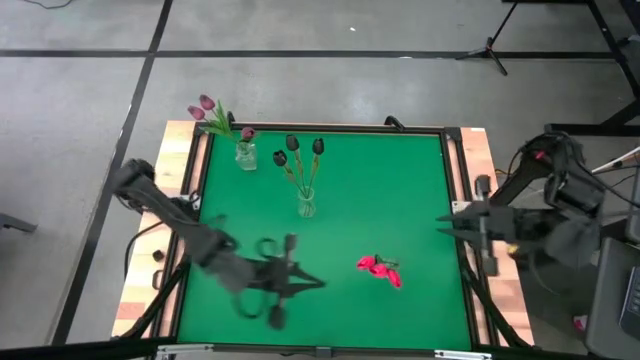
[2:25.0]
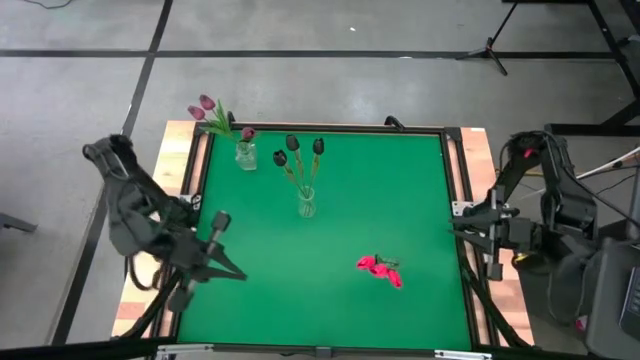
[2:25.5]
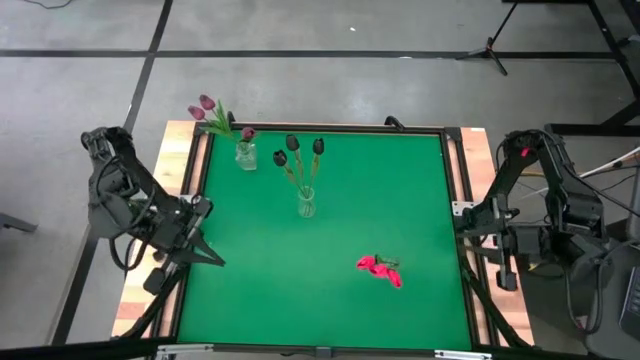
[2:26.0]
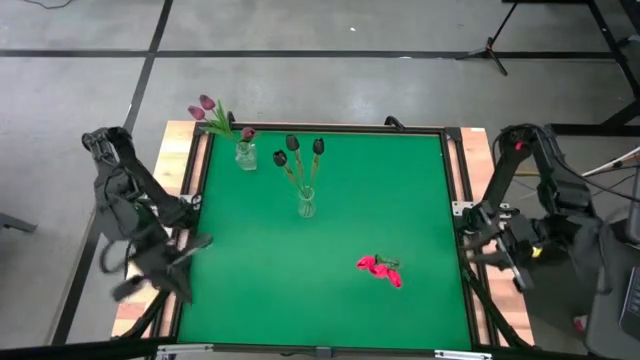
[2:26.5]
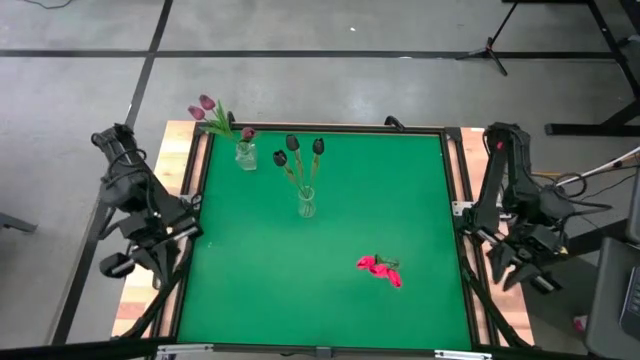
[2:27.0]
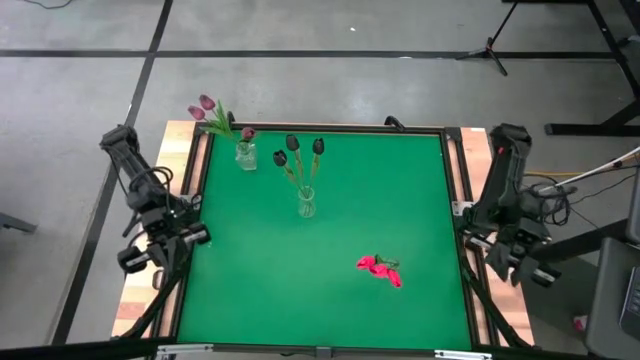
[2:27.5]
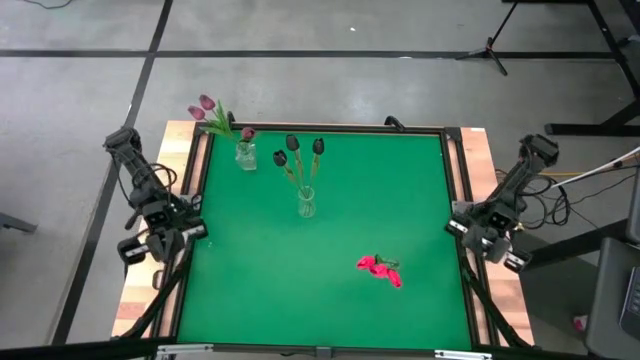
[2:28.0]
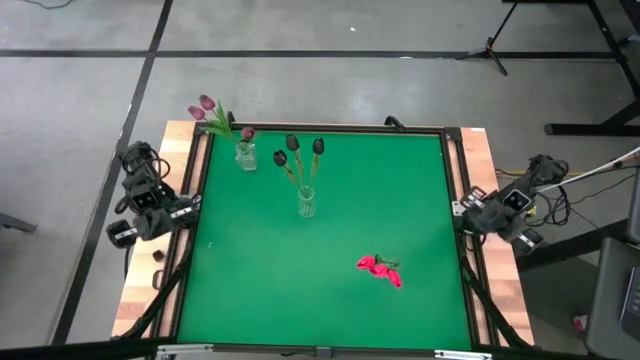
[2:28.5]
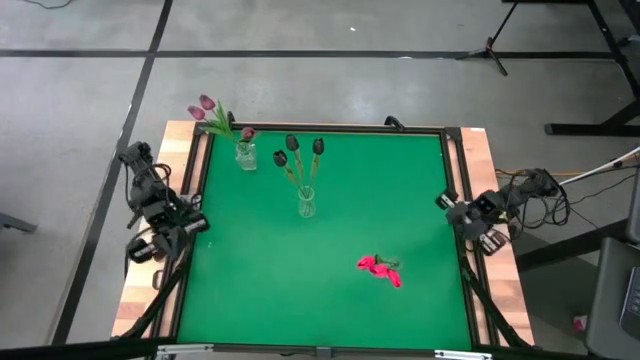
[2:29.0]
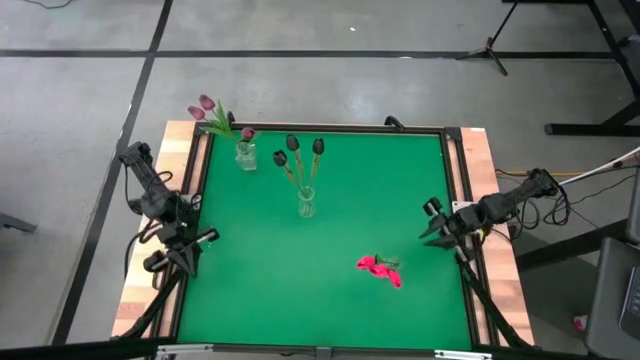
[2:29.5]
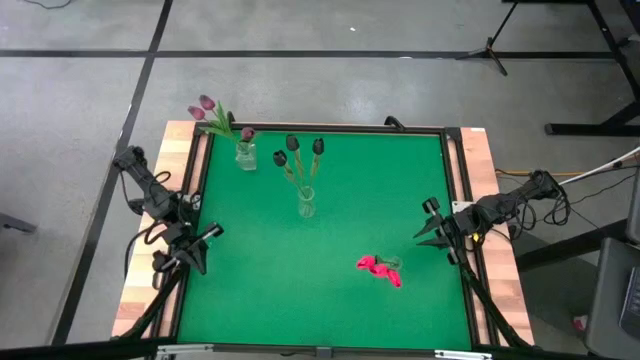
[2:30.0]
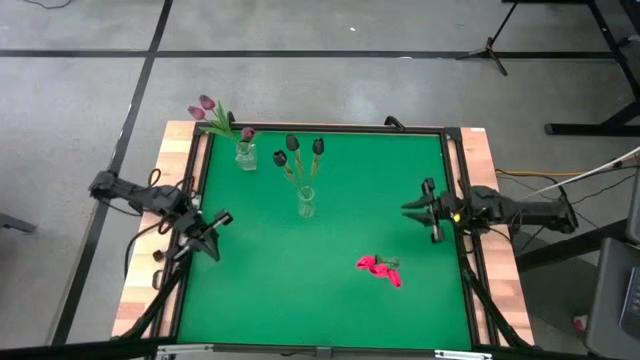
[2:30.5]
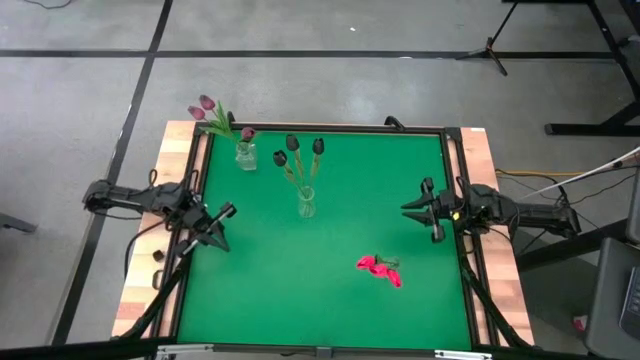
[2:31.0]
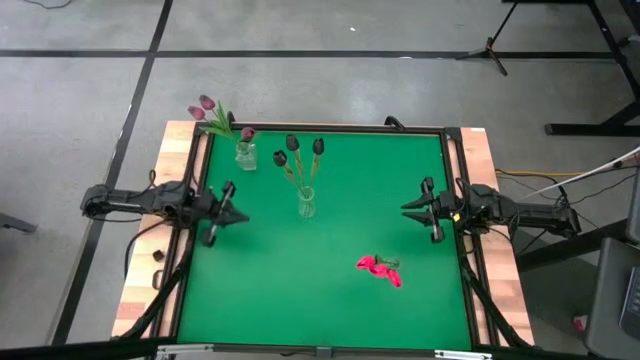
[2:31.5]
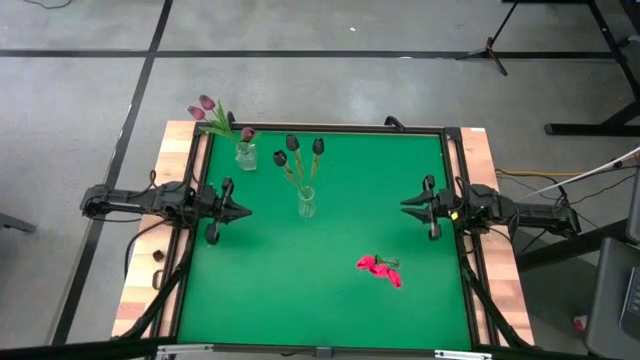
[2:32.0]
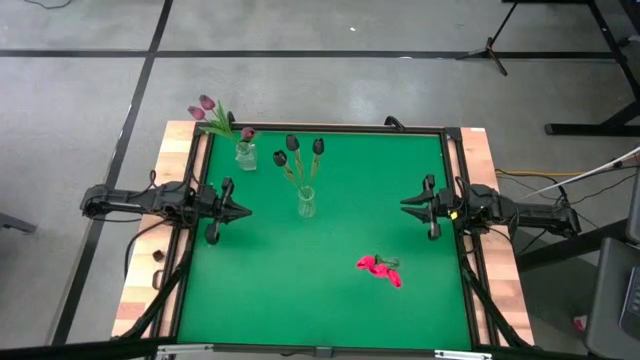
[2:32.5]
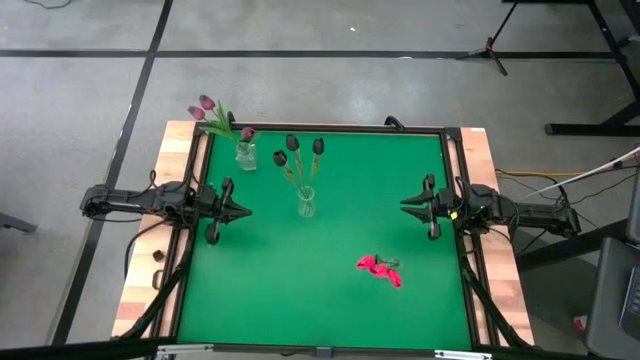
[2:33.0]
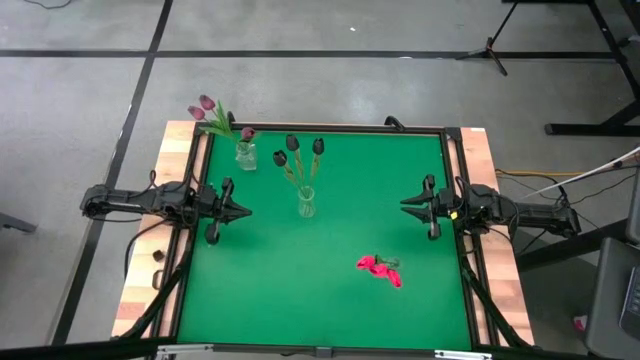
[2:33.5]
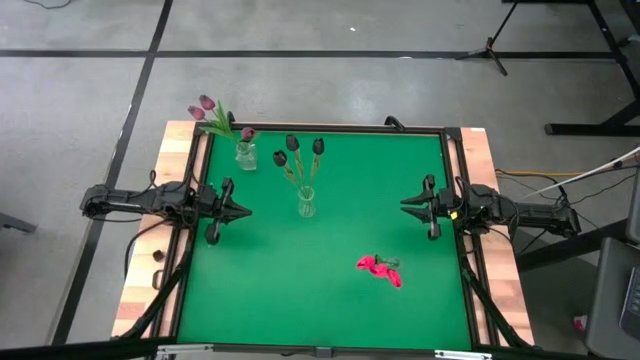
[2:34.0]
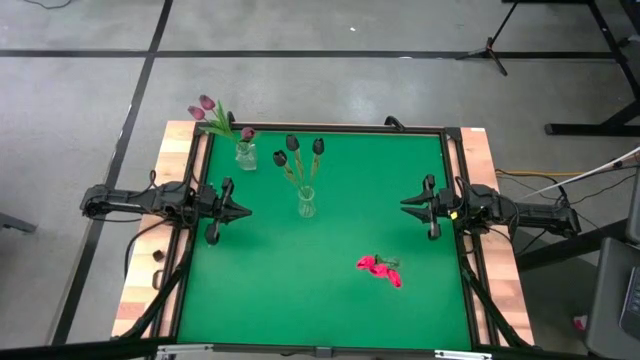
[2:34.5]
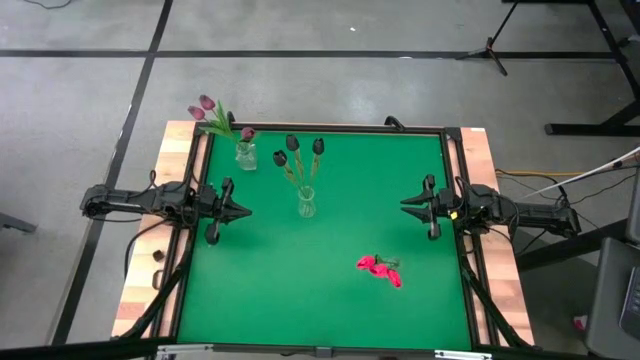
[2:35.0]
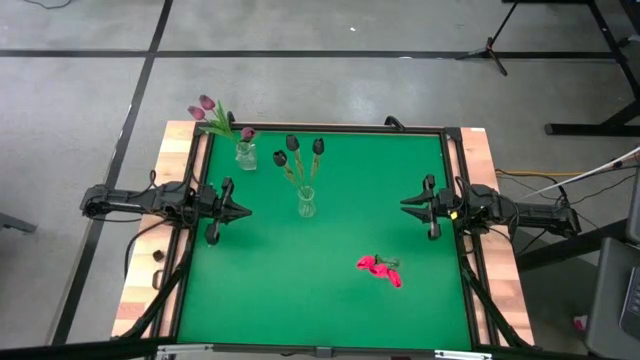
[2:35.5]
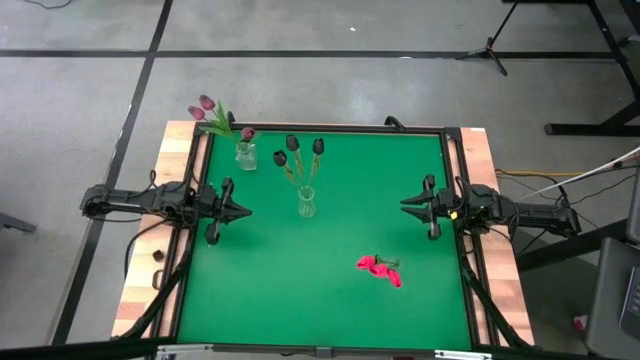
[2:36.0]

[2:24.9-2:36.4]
Task: Sort flowers into vase by color
Return to Home Position

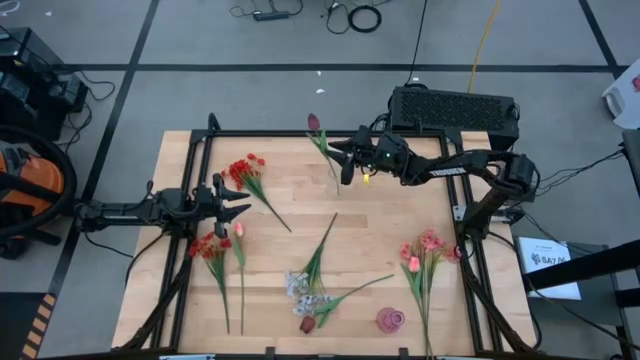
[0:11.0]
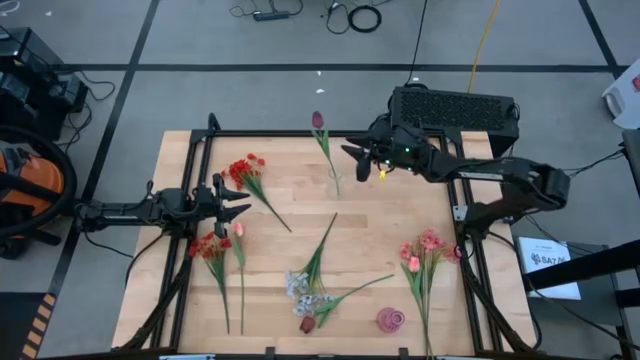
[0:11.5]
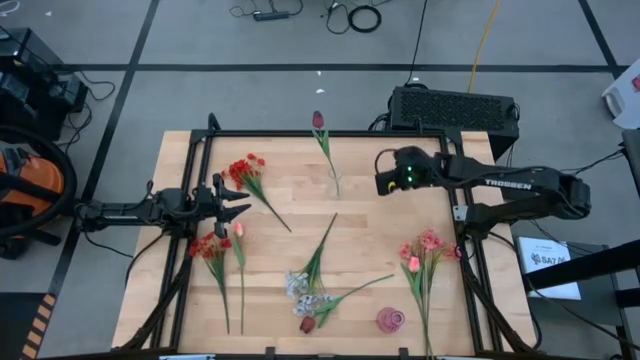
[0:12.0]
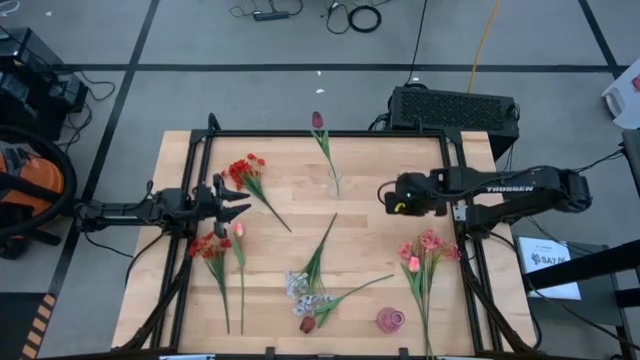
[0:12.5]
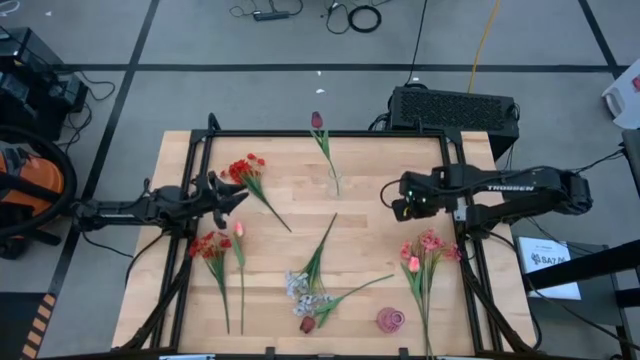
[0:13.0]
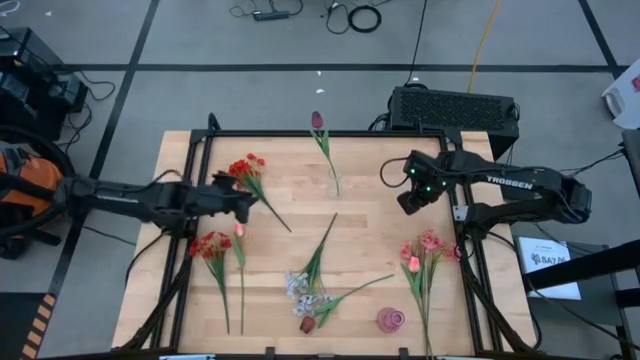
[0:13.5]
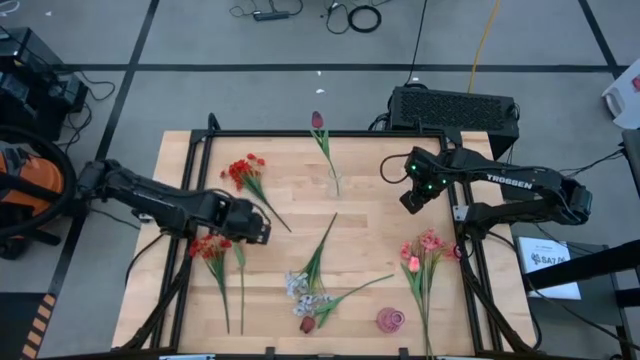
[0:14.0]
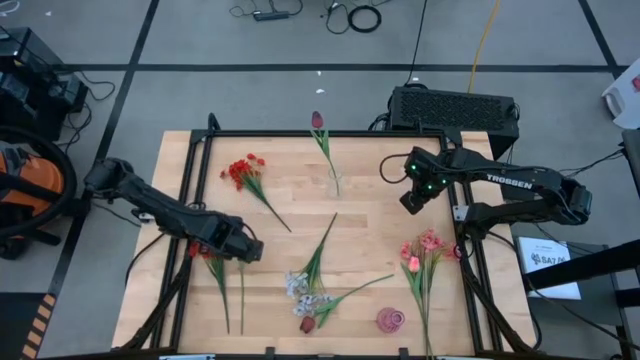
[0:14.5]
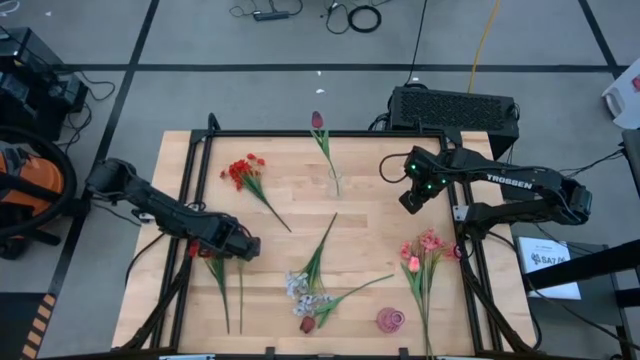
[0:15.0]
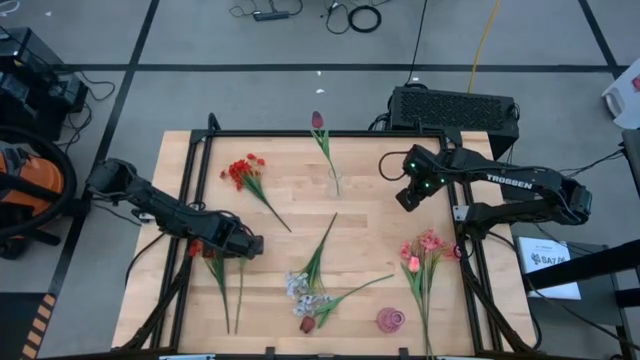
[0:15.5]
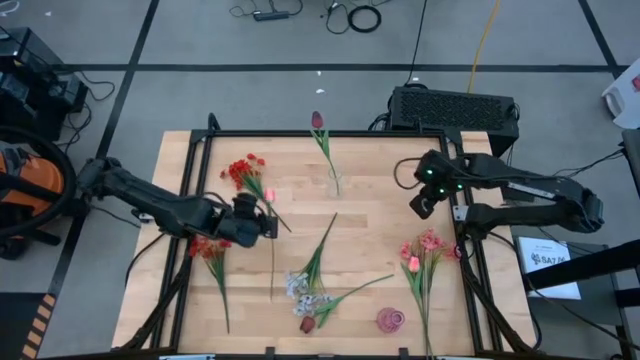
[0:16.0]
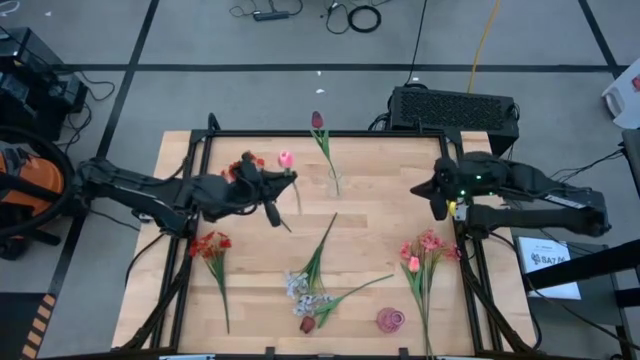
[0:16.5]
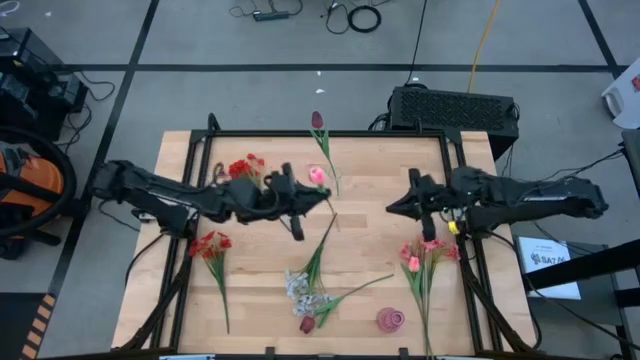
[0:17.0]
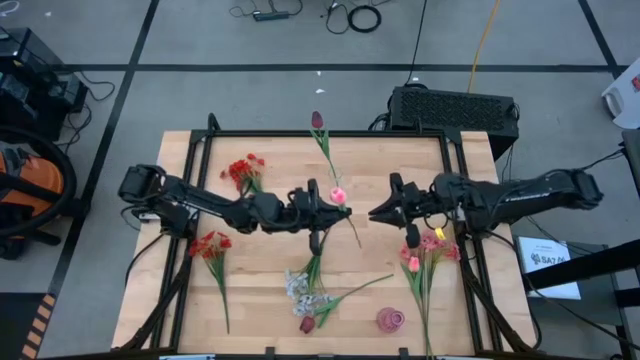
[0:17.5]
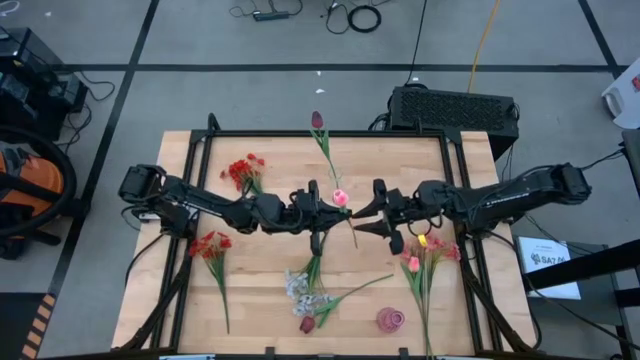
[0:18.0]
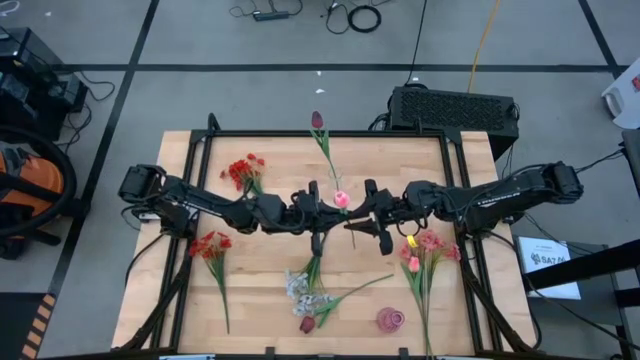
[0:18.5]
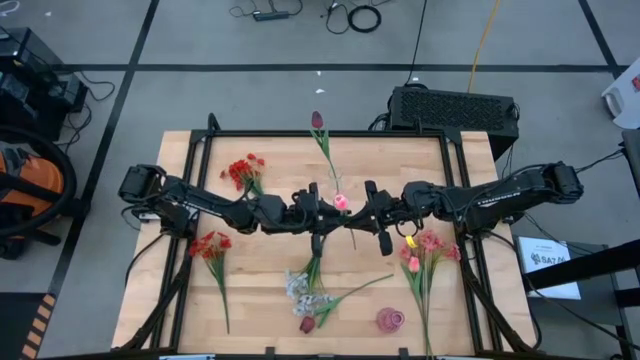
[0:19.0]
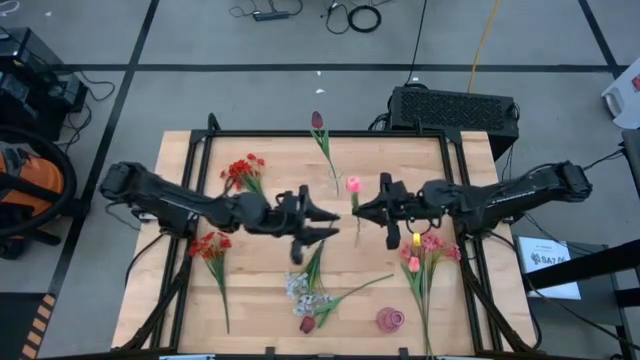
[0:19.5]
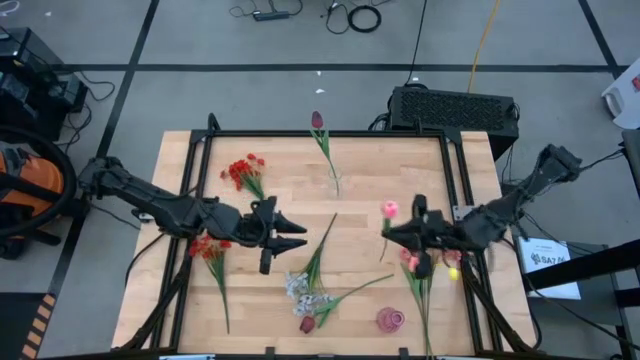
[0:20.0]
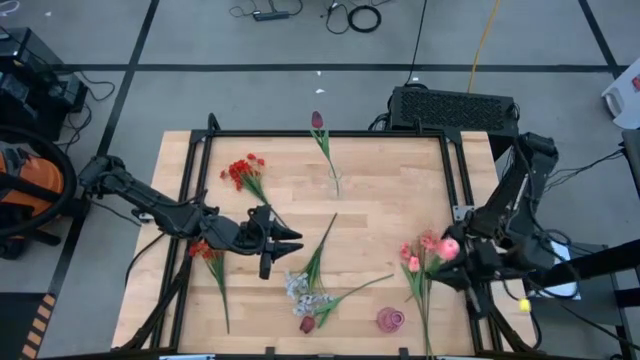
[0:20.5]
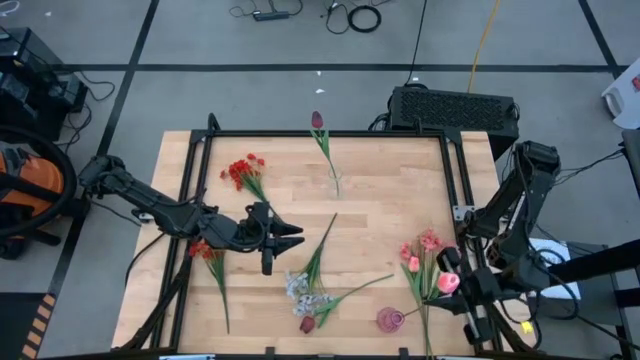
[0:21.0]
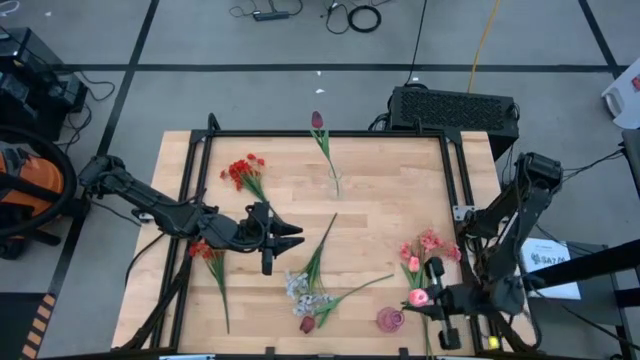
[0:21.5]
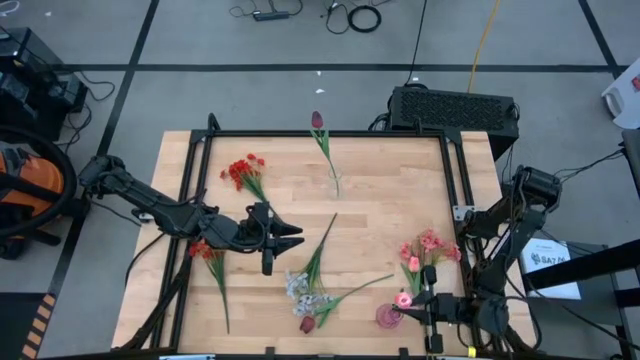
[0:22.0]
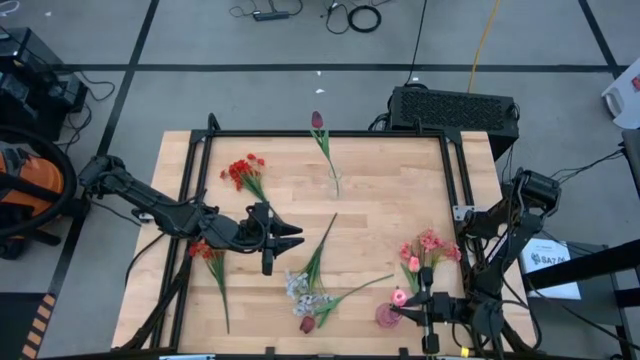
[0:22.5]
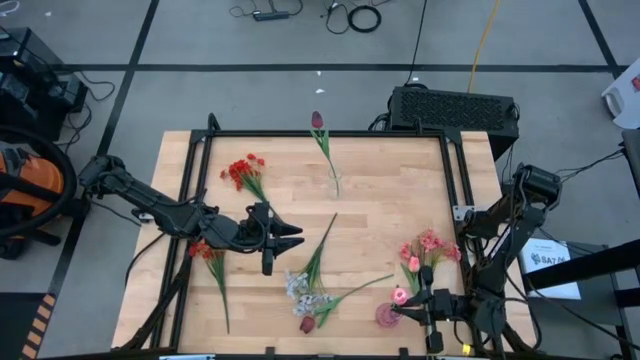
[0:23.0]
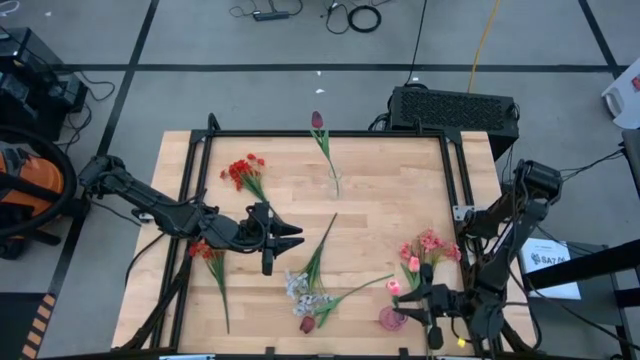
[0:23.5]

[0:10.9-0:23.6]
Task: Sort flowers into vase by color
Put the left pink flower into the purple vase
